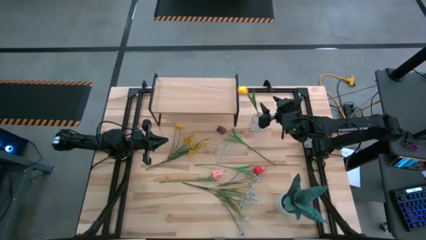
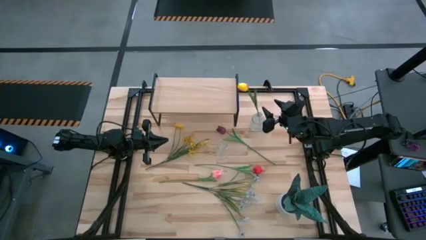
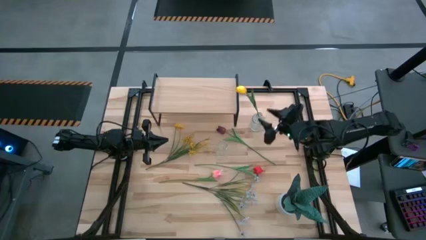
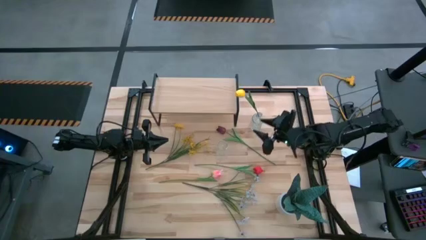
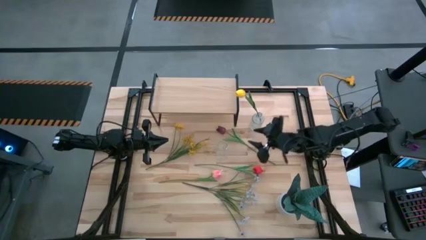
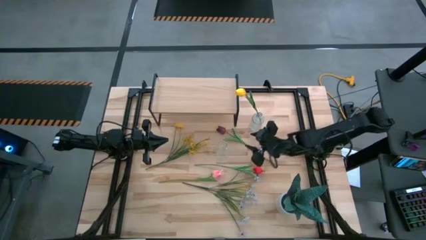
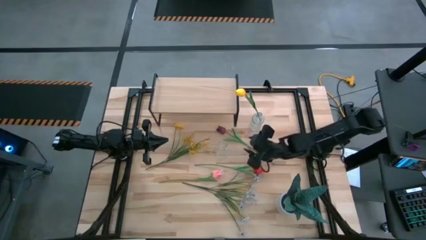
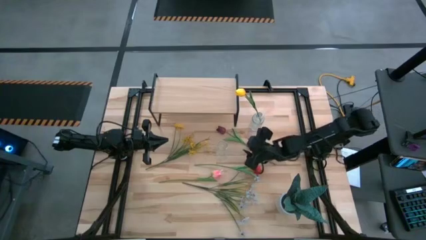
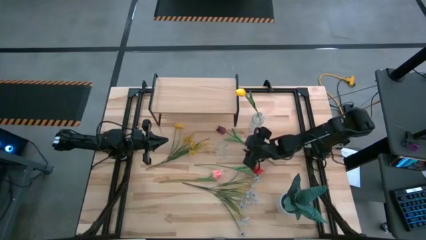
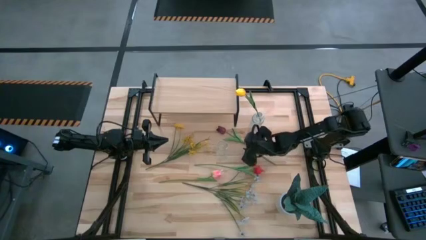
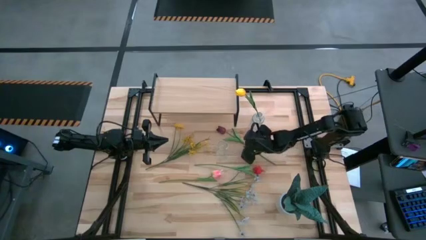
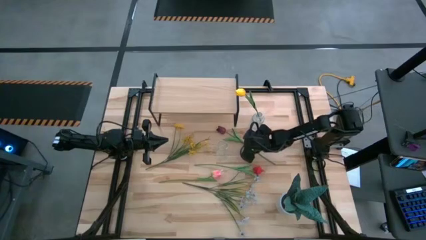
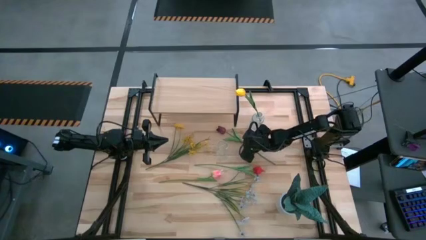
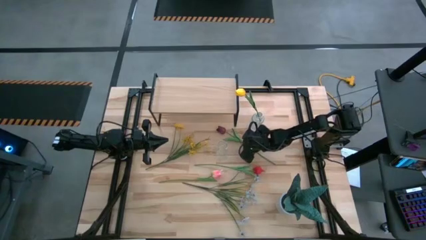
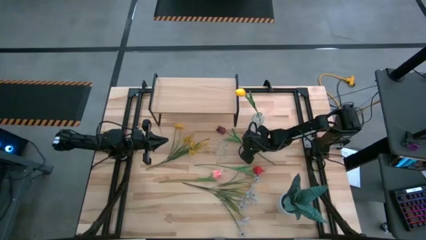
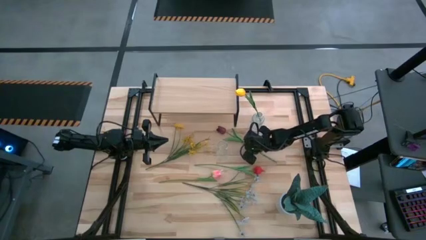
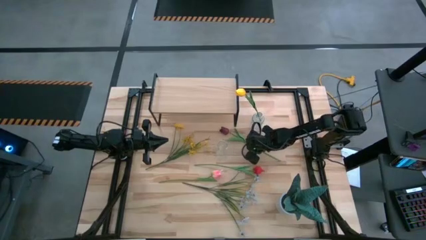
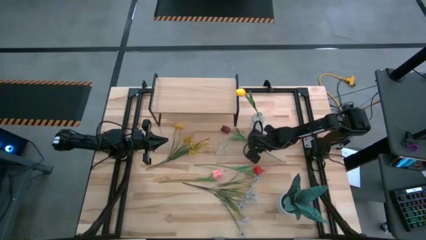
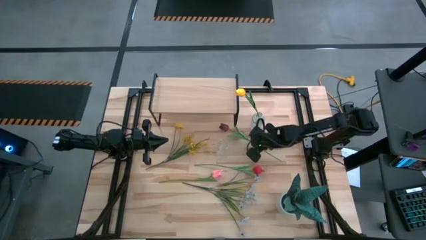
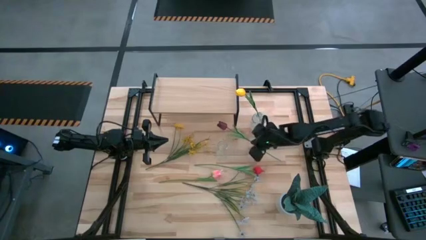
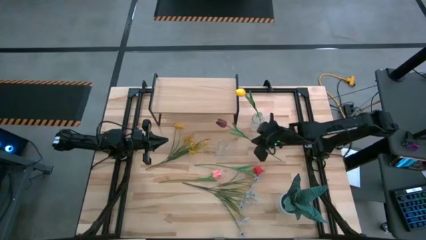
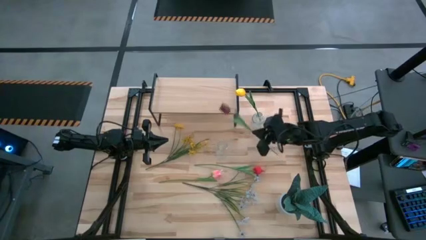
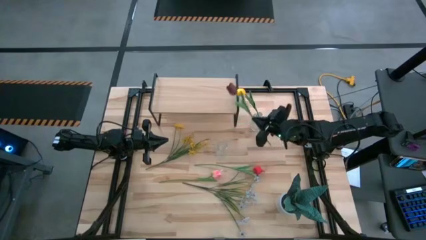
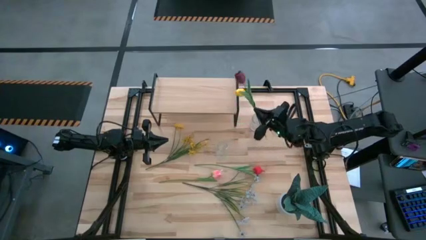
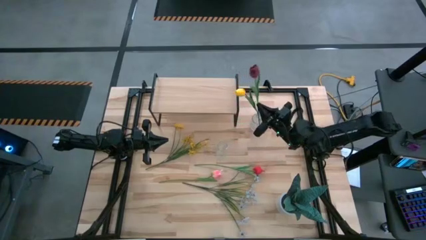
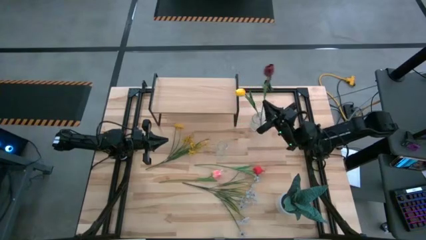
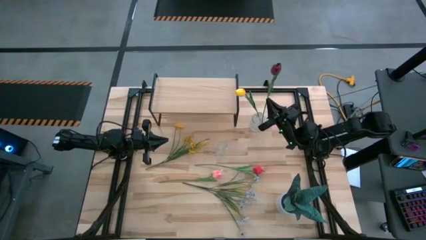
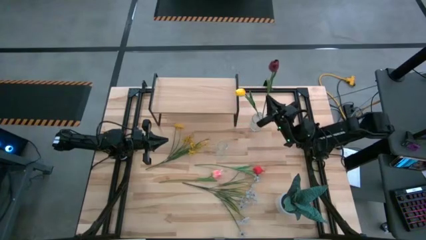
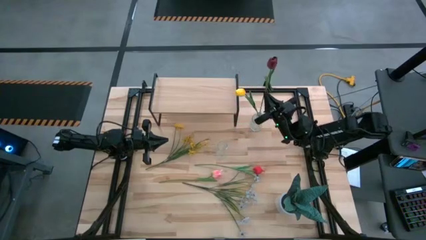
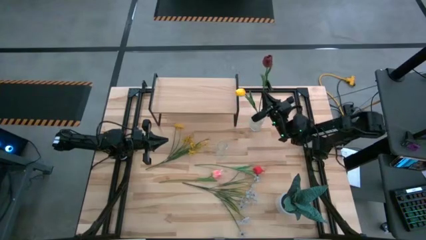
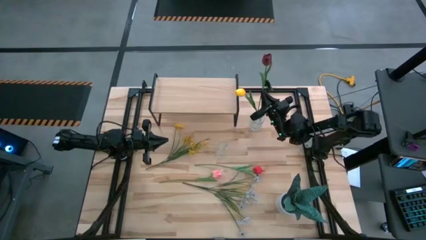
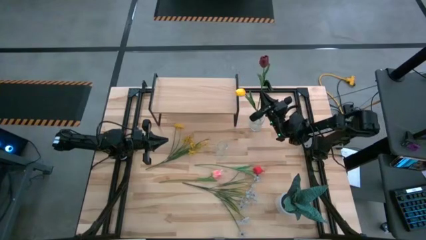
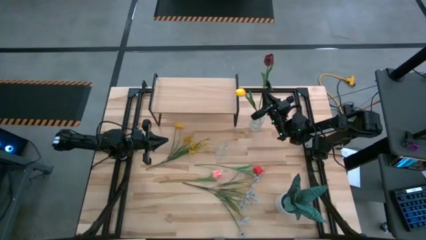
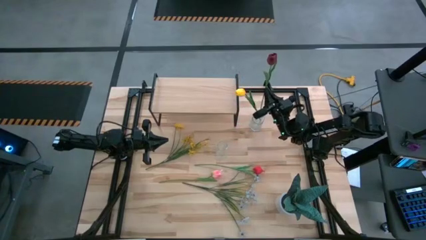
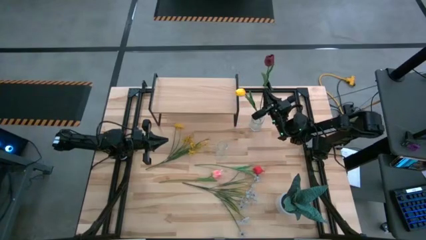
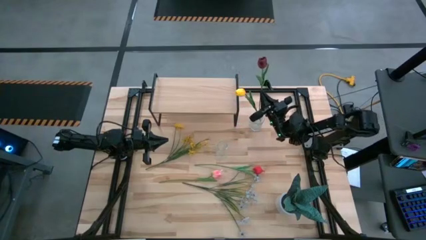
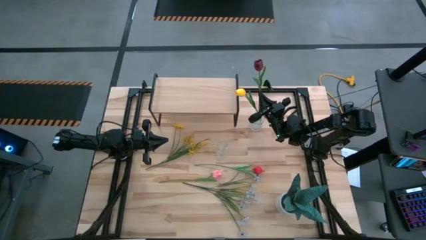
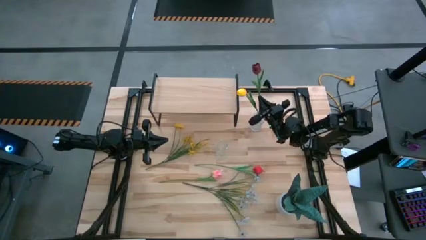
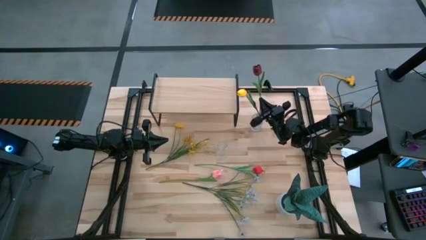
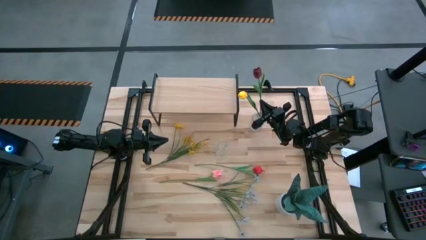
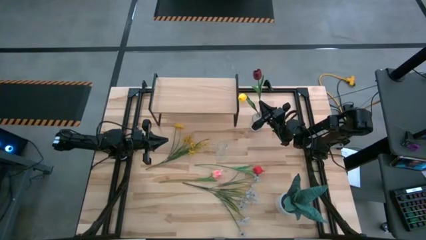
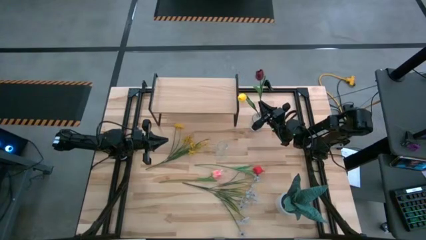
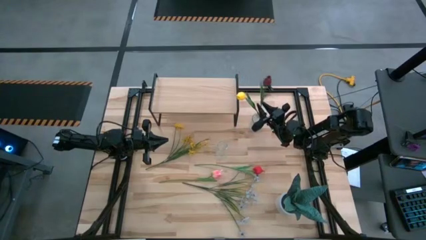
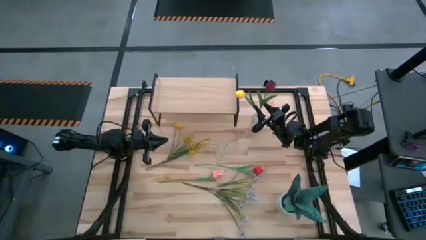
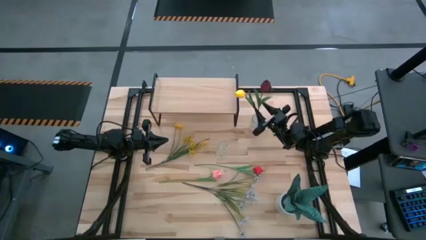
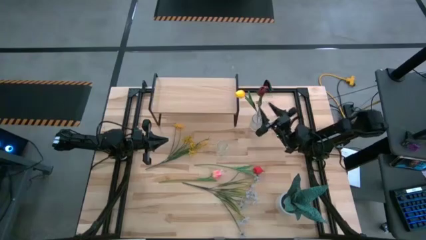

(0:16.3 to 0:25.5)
Task: Pick and place flowers into a vace then onto a shelf
Put the dark red tulip into the top transparent vase

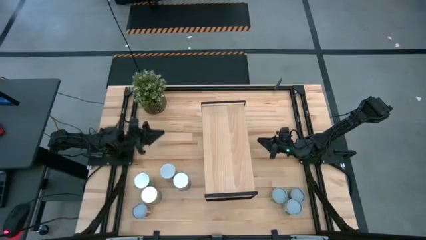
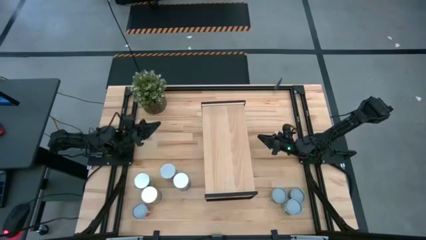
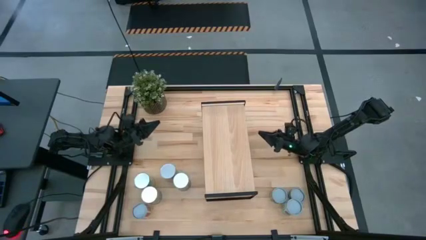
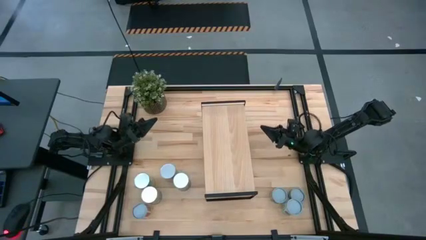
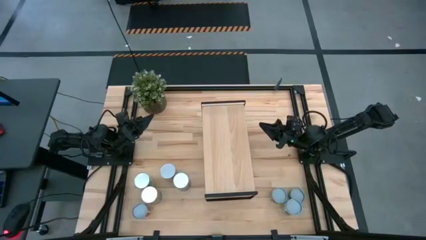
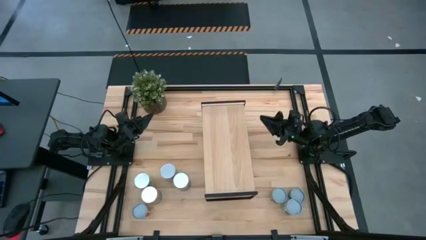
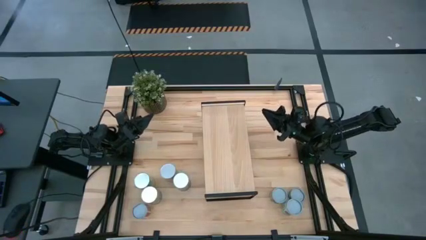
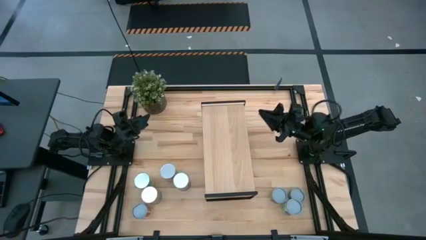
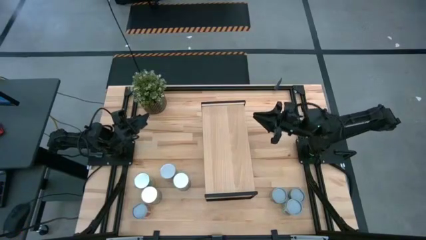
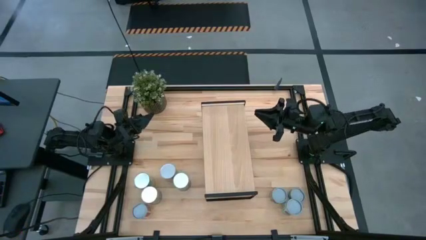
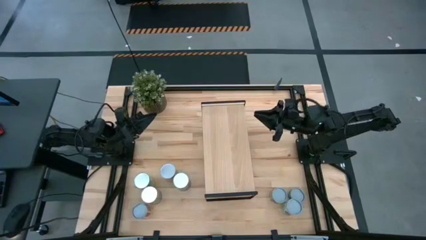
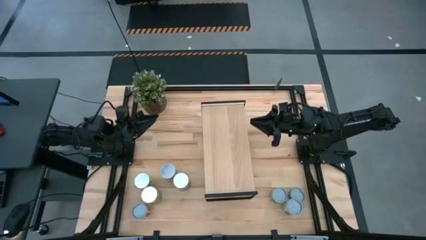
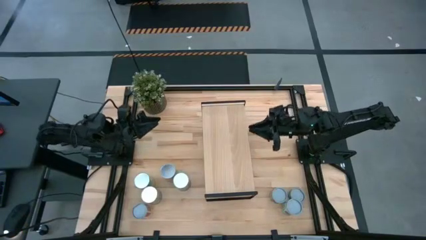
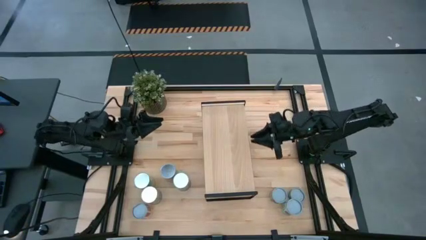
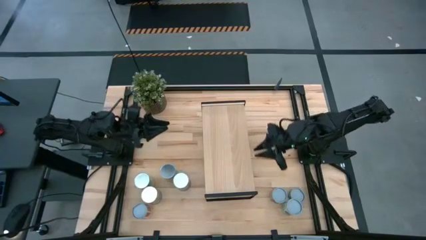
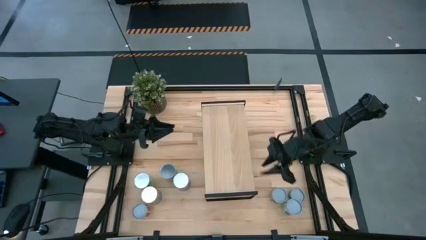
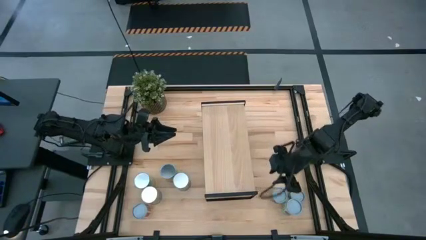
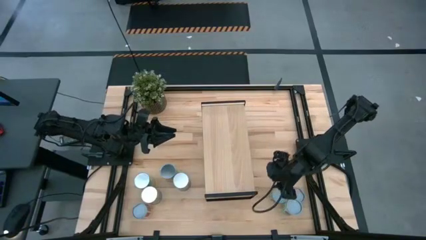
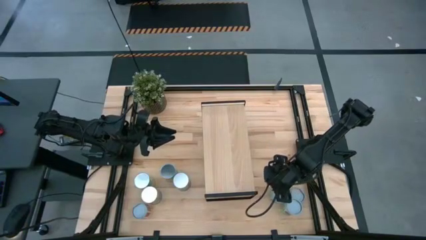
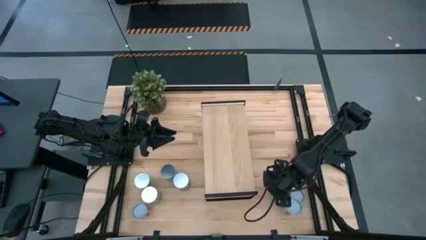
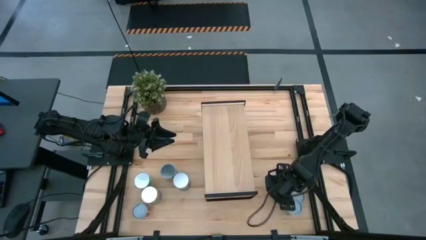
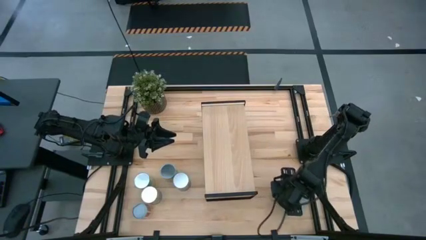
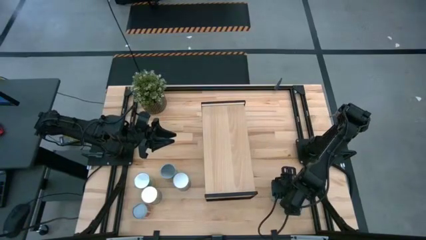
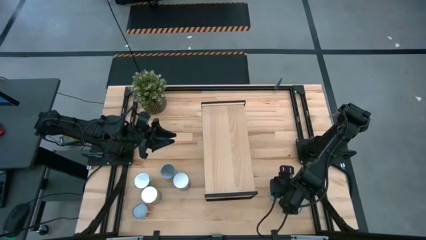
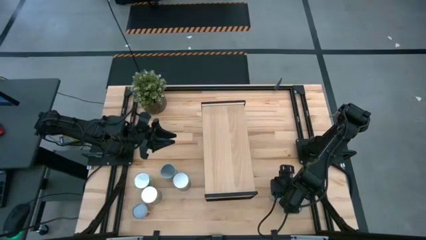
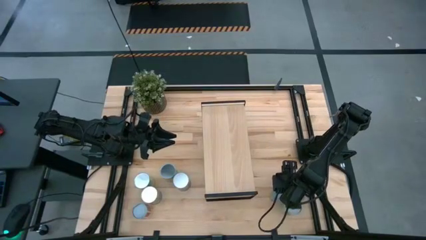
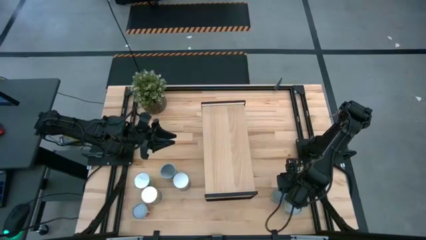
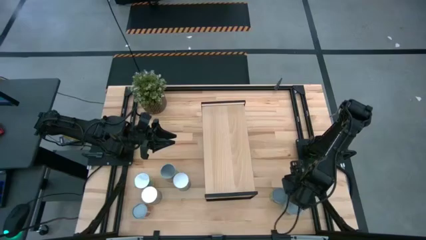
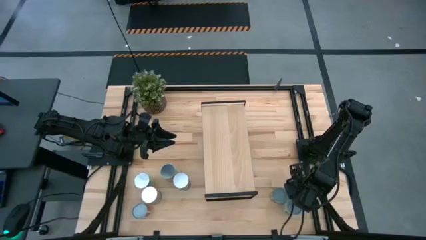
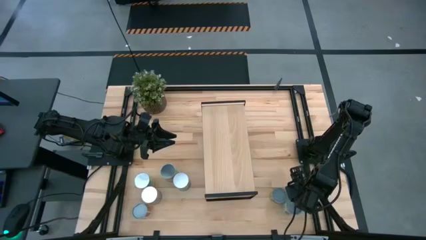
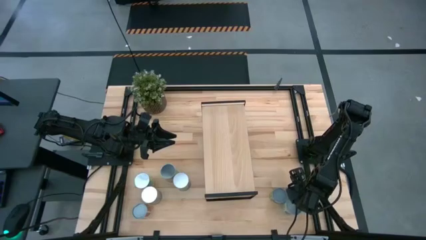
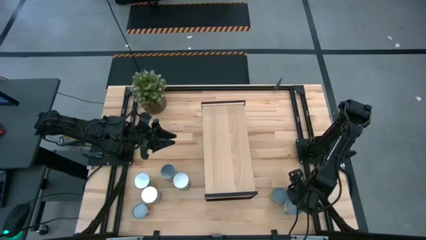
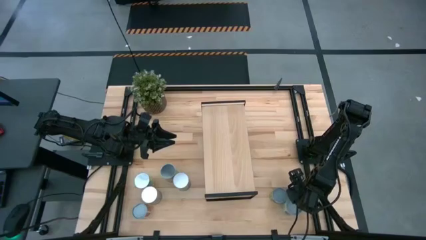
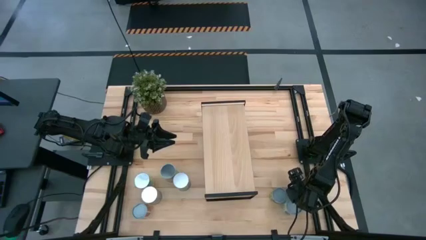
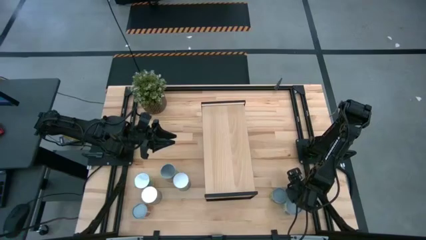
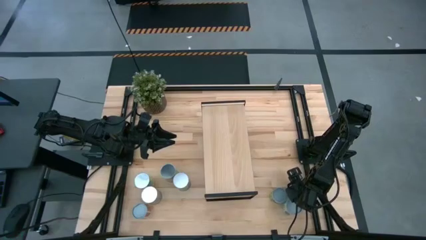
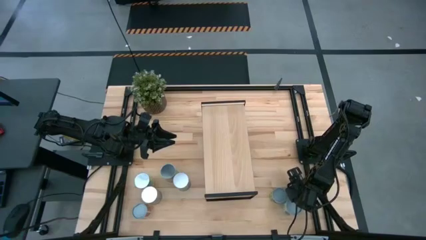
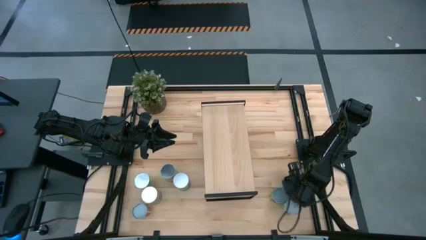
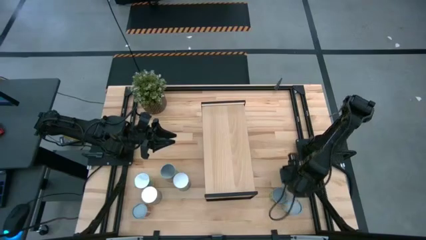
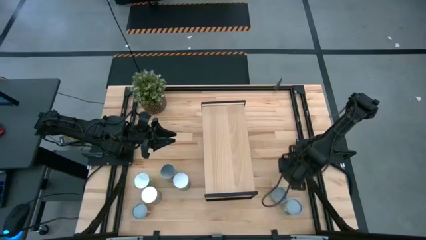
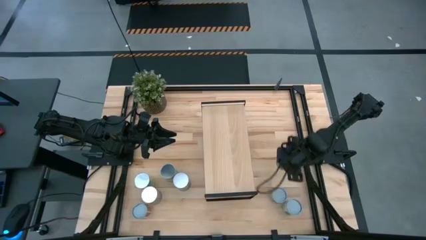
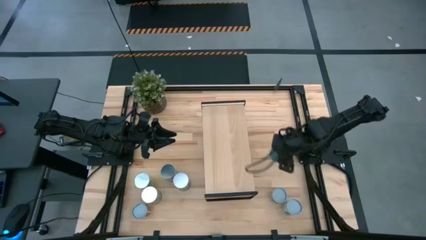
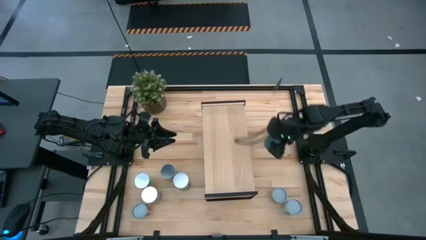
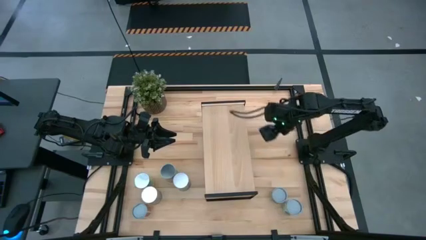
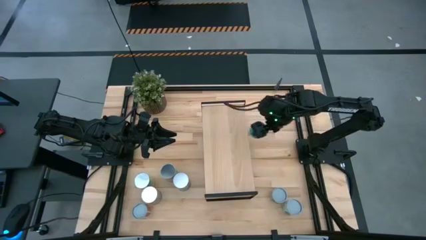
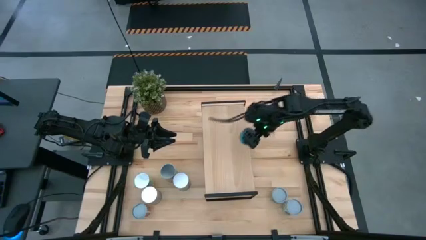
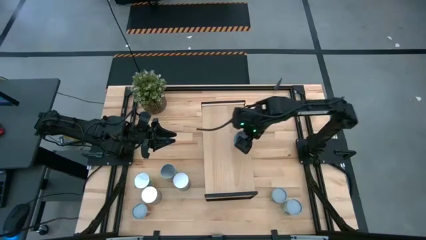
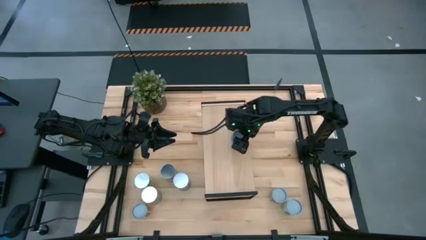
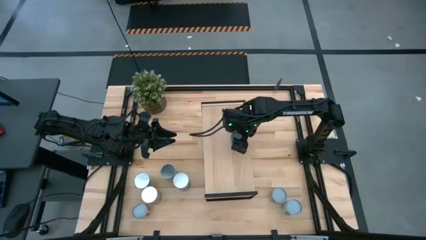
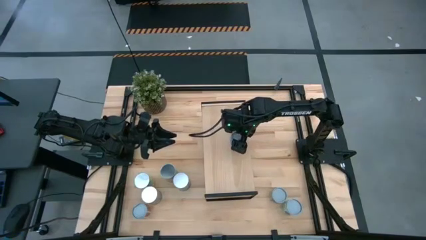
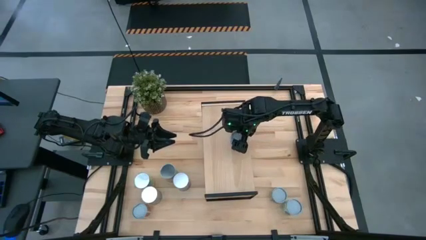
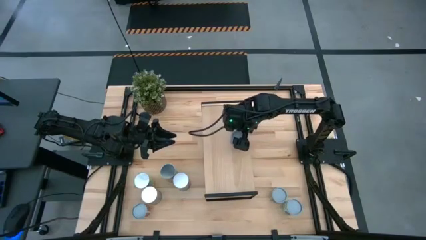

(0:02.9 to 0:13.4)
Task: Pick and place cans onto a shelf
Put the green tuna can on the shelf
